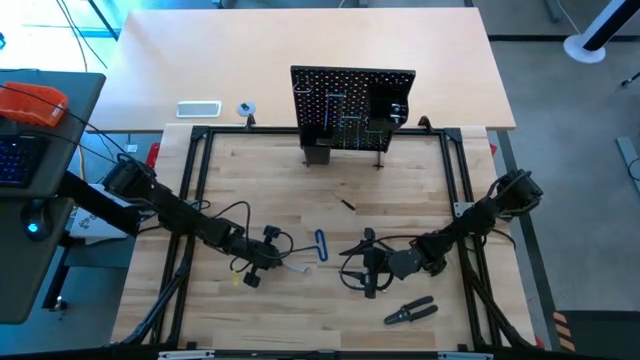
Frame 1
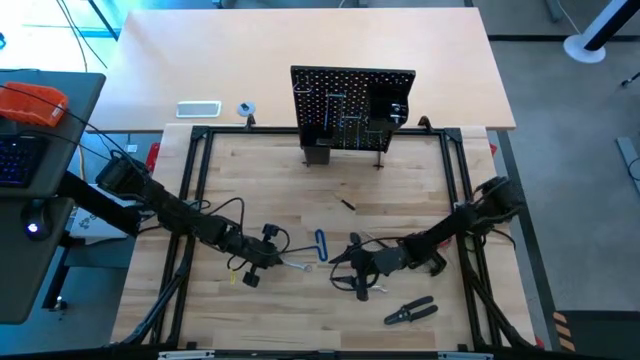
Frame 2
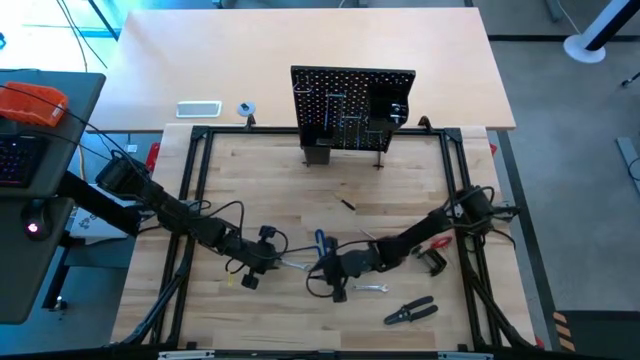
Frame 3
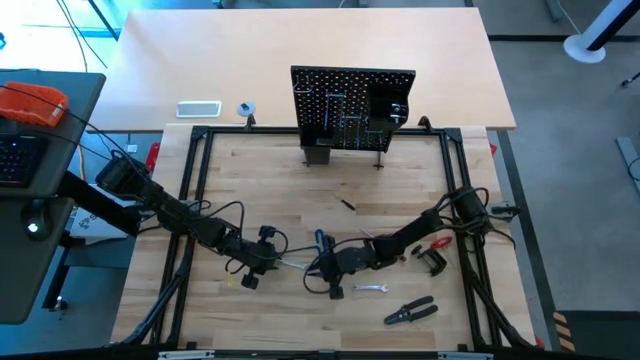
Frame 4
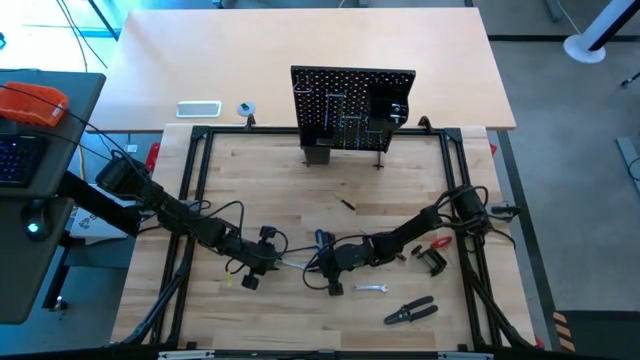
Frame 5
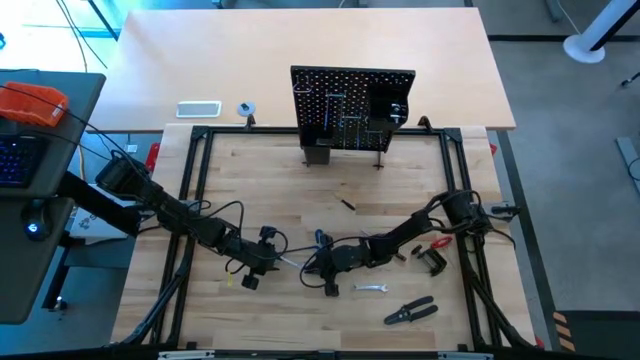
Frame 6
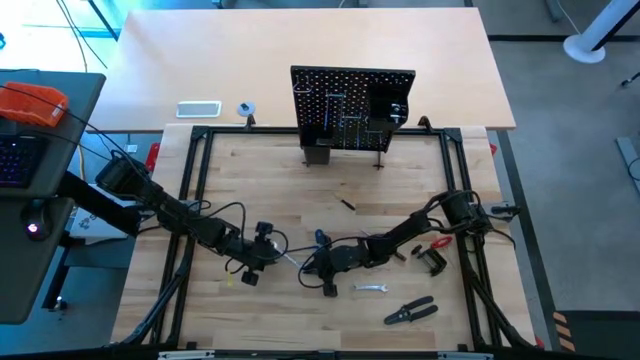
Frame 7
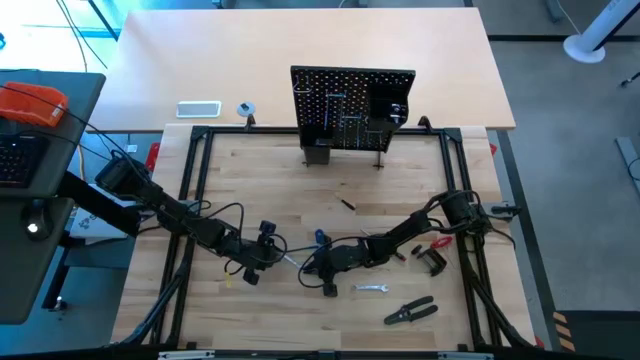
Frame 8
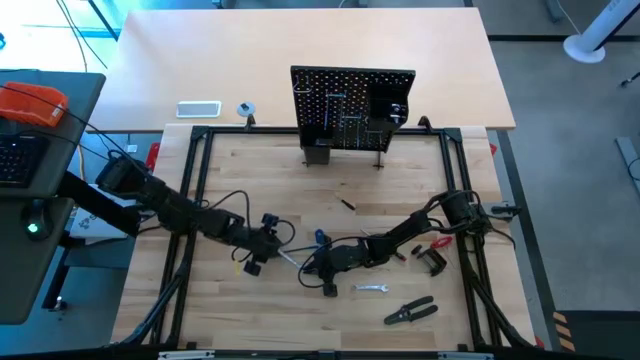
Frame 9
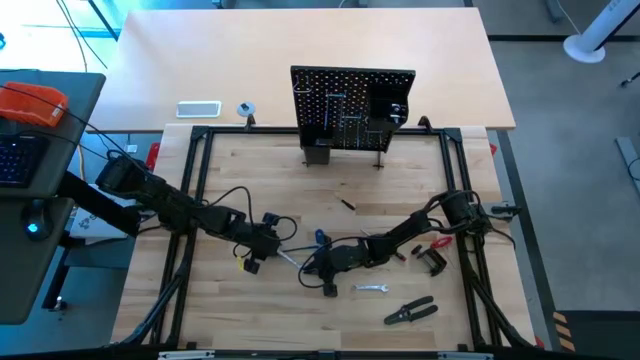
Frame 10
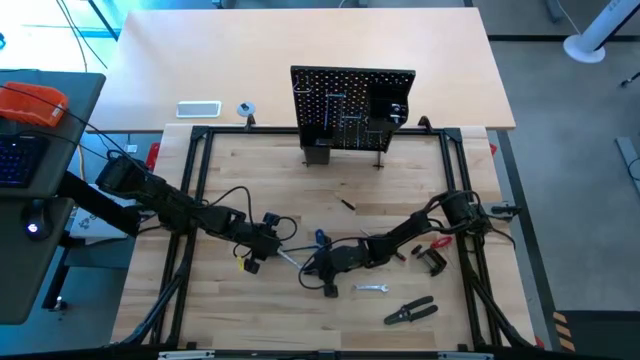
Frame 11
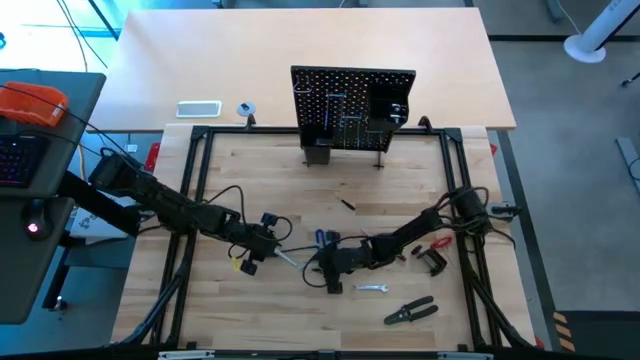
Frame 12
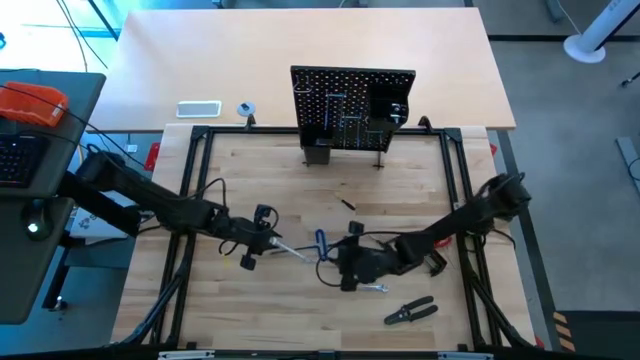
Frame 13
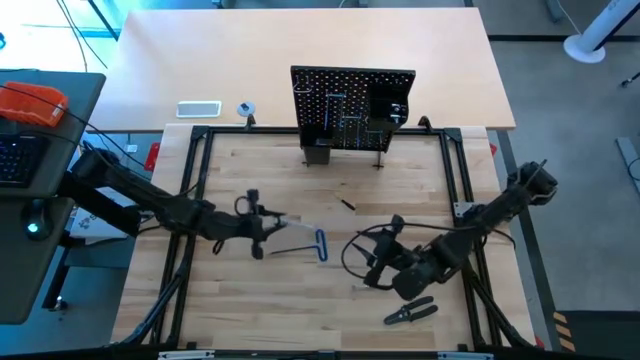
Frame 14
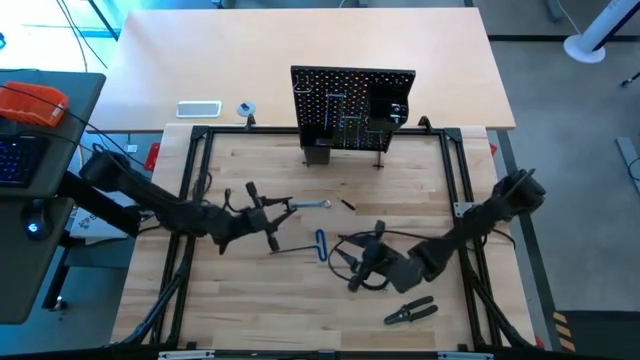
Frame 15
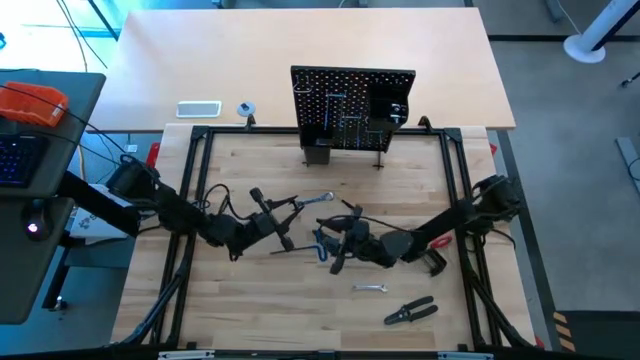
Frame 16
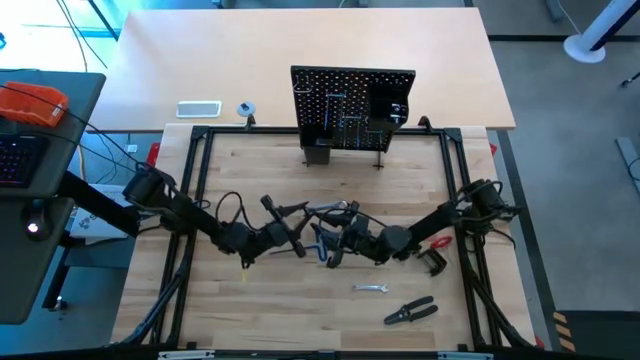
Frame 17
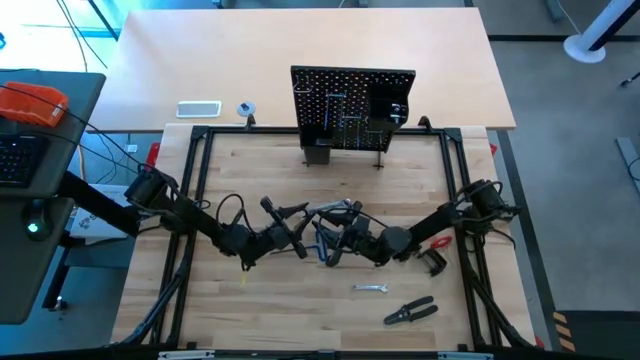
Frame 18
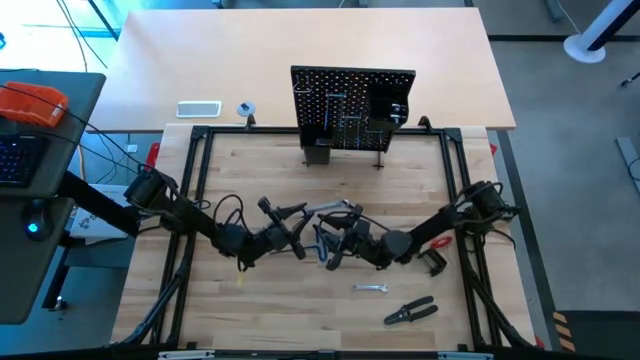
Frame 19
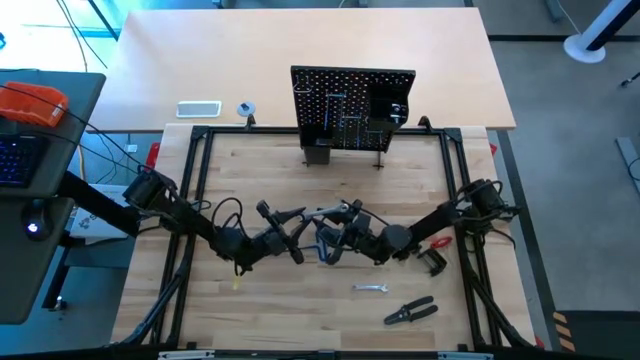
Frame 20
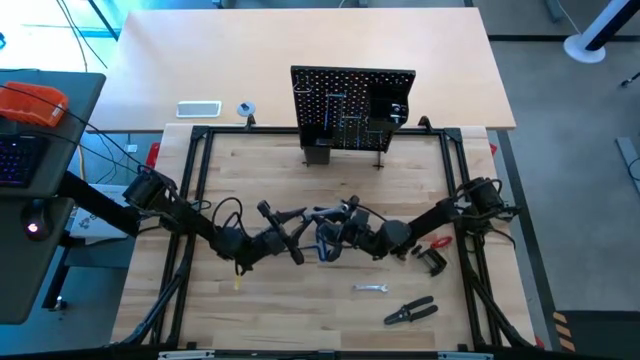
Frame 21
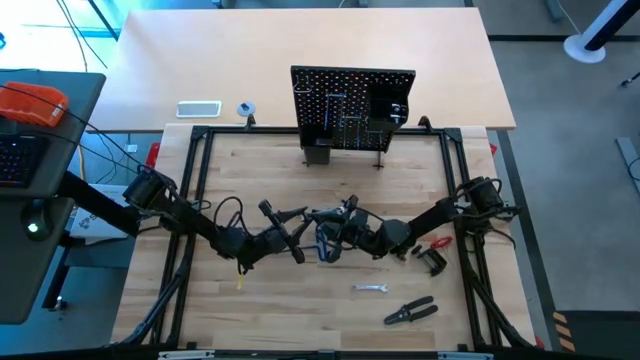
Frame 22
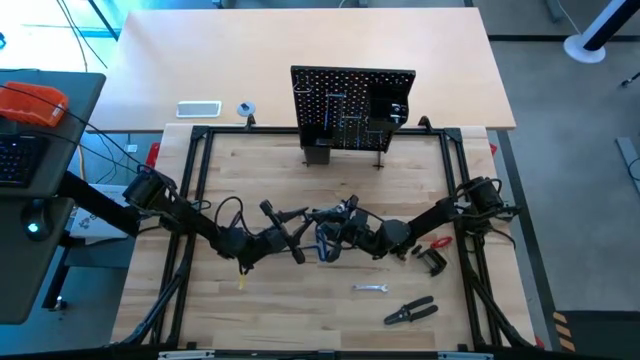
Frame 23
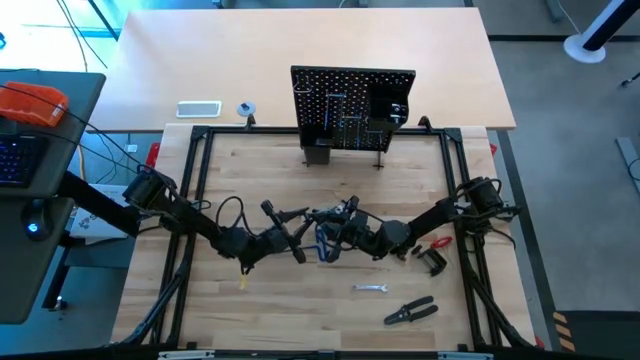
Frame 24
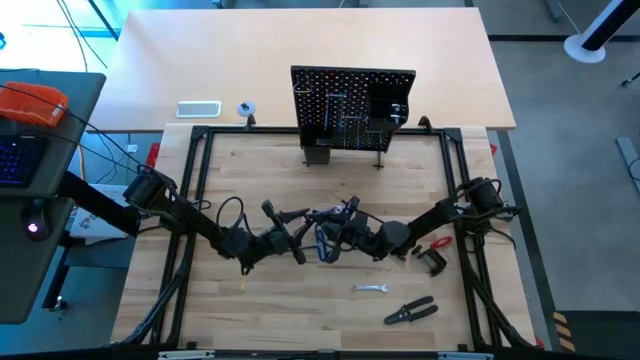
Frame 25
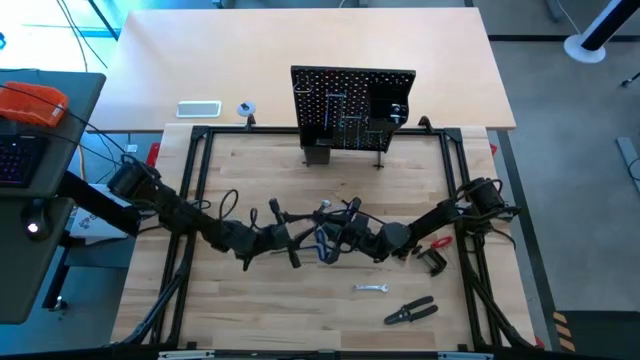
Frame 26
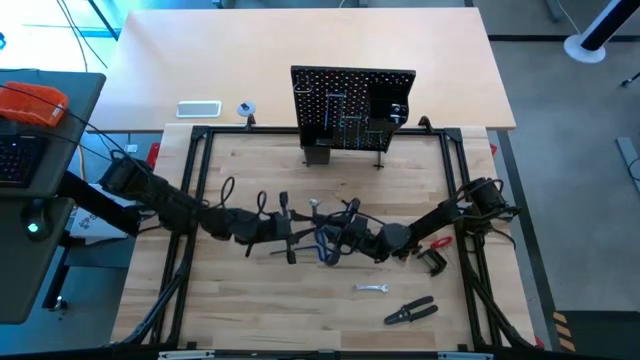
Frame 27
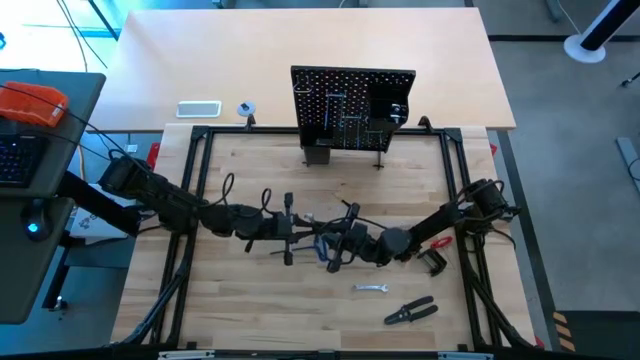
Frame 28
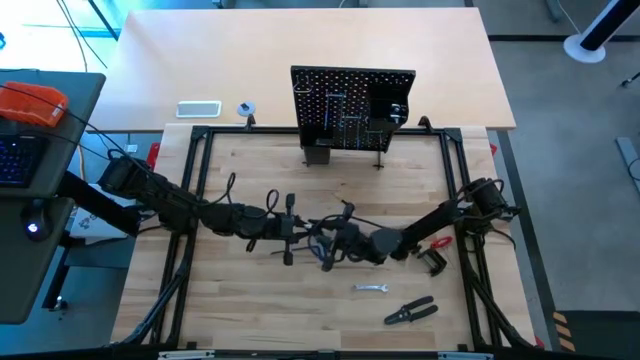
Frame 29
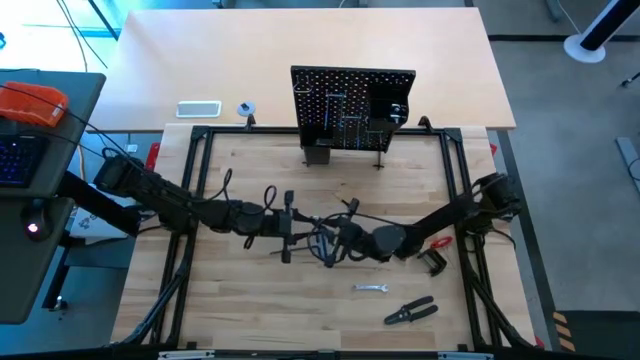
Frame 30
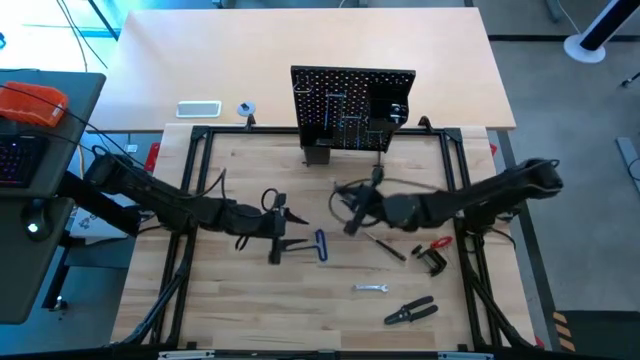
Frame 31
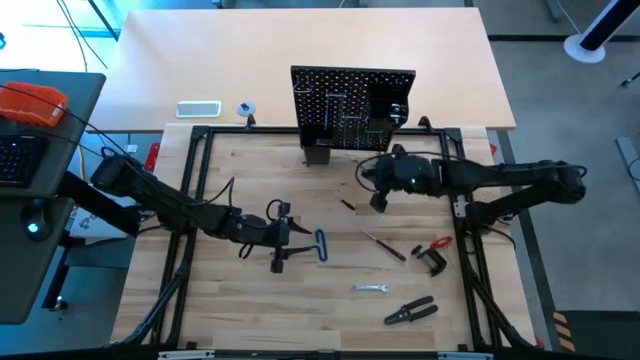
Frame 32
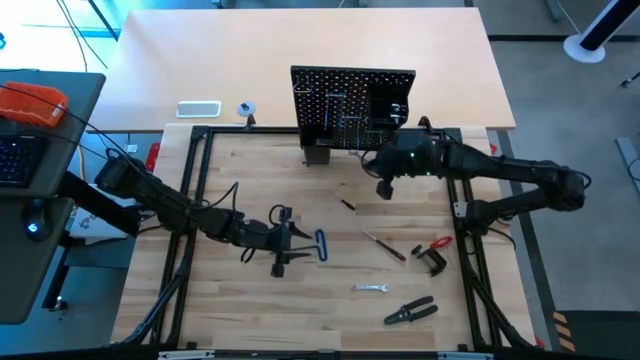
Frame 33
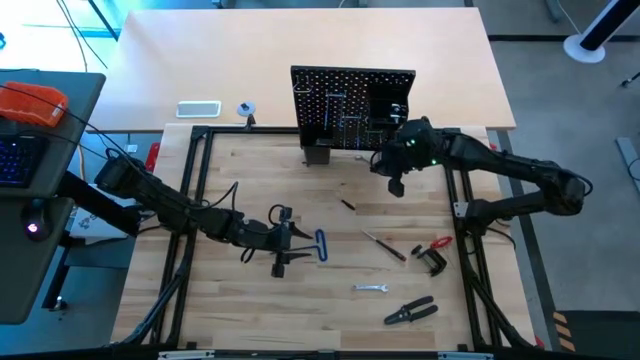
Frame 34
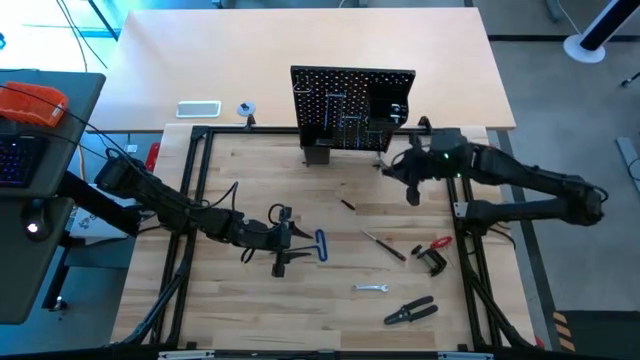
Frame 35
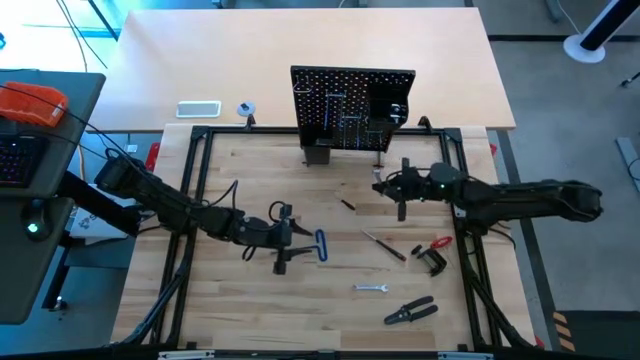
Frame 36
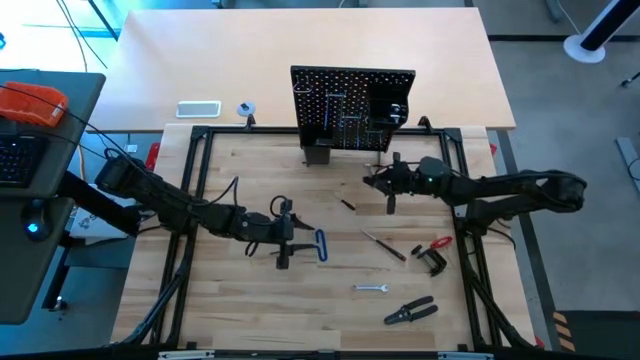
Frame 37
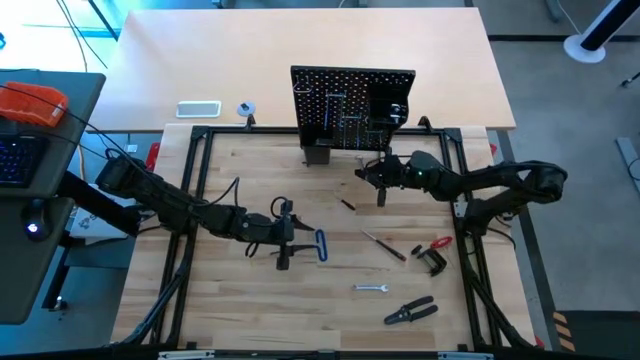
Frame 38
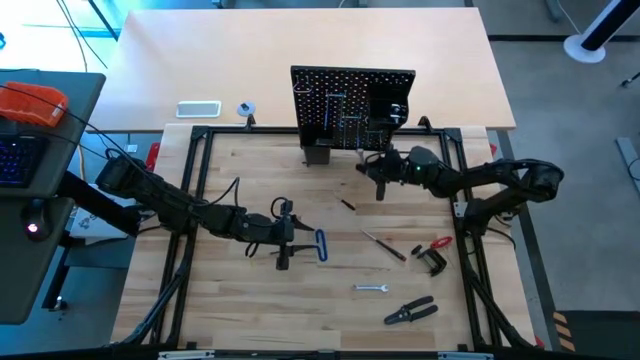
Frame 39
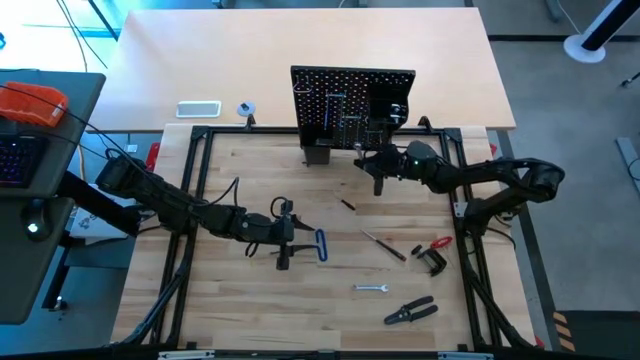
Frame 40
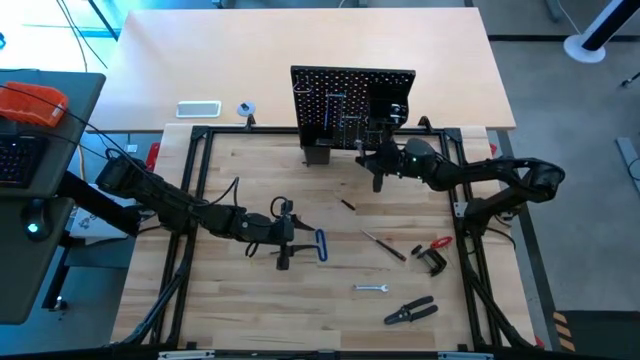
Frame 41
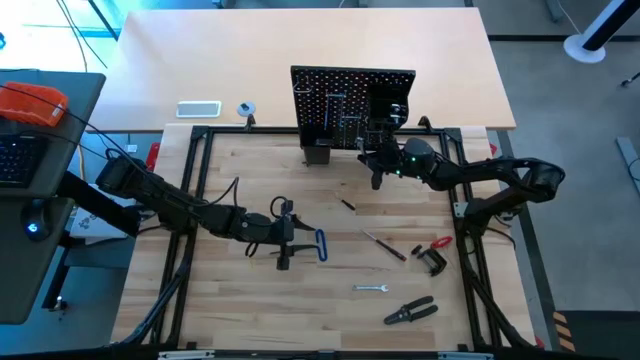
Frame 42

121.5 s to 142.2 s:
Task: Hang tools onto peg board
Hang the left wrench on the pegboard
